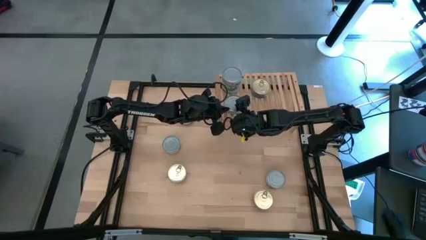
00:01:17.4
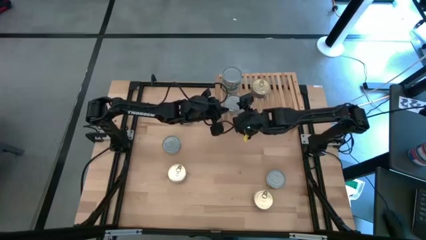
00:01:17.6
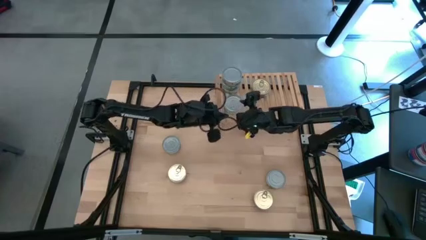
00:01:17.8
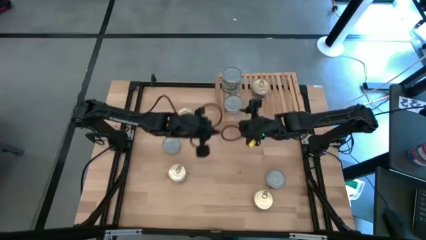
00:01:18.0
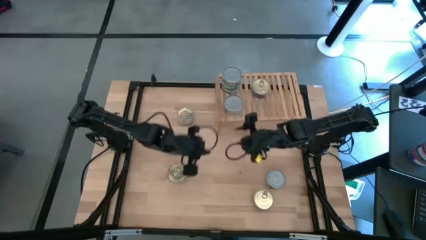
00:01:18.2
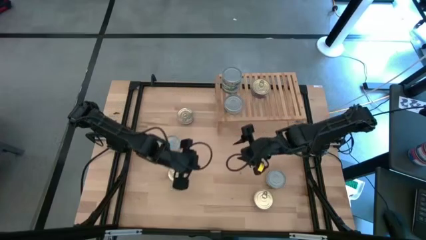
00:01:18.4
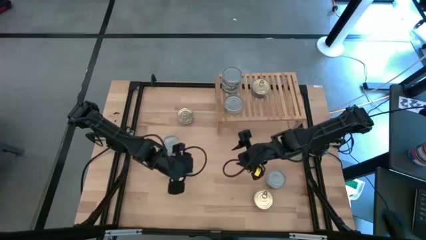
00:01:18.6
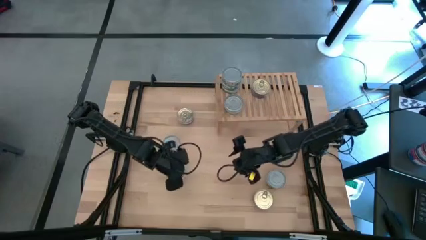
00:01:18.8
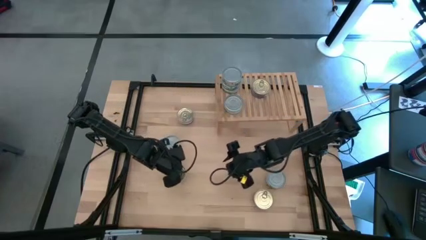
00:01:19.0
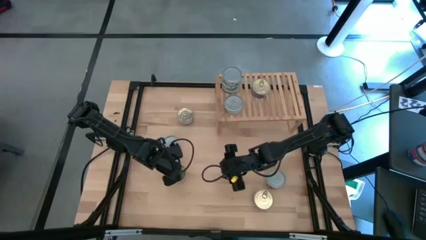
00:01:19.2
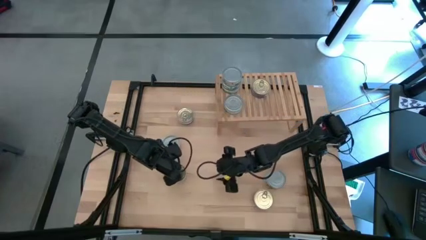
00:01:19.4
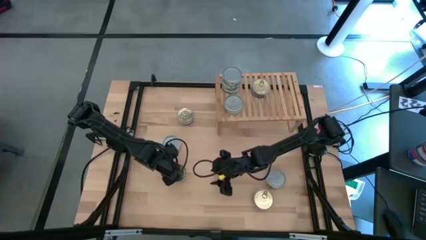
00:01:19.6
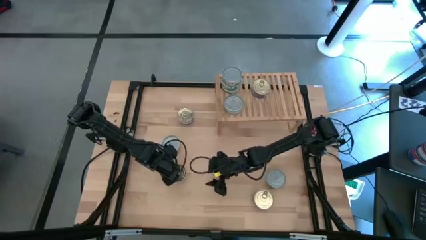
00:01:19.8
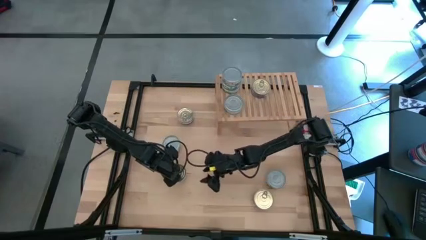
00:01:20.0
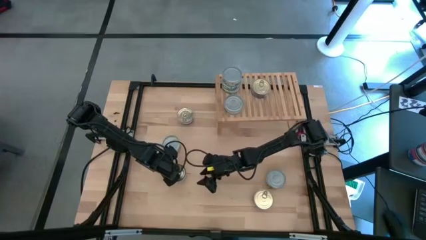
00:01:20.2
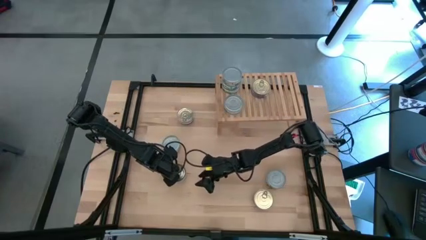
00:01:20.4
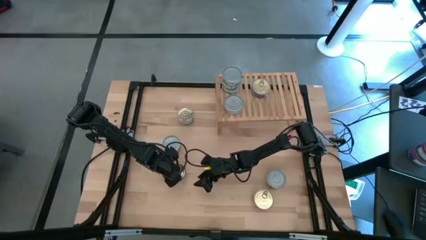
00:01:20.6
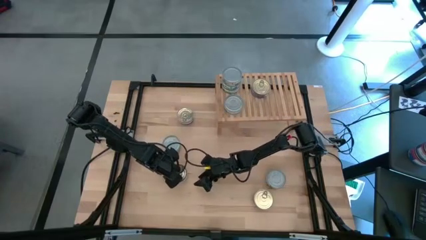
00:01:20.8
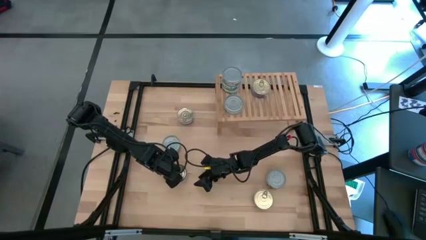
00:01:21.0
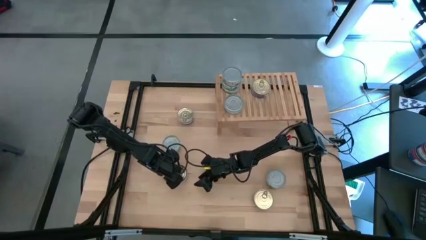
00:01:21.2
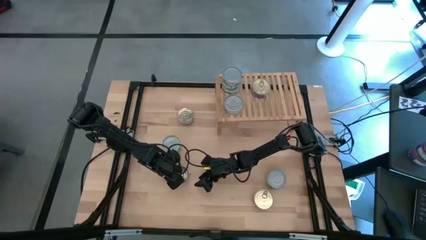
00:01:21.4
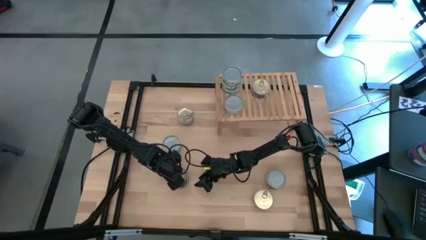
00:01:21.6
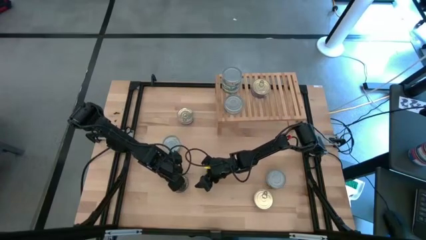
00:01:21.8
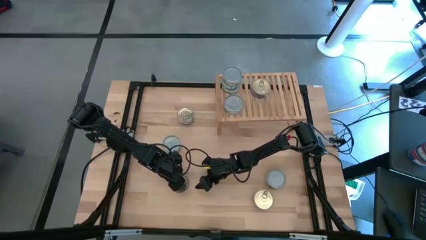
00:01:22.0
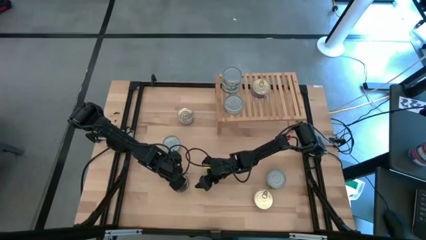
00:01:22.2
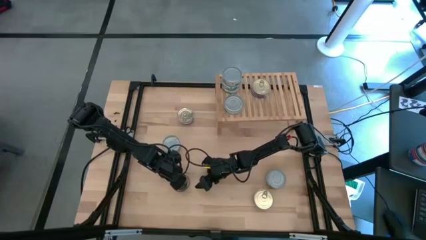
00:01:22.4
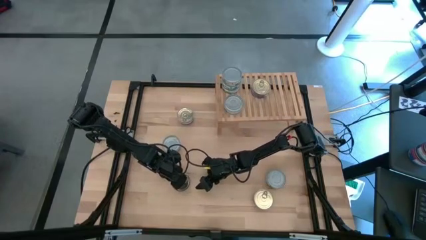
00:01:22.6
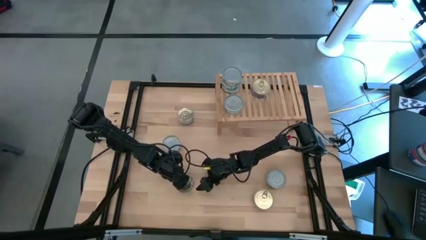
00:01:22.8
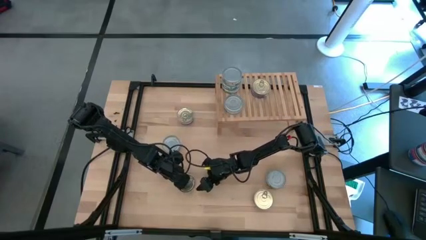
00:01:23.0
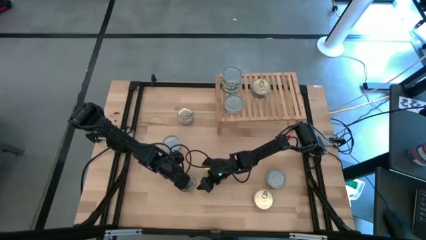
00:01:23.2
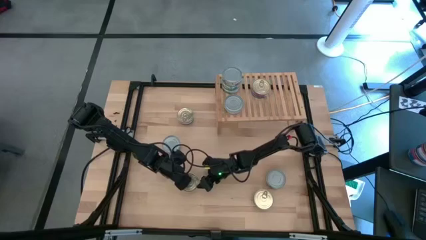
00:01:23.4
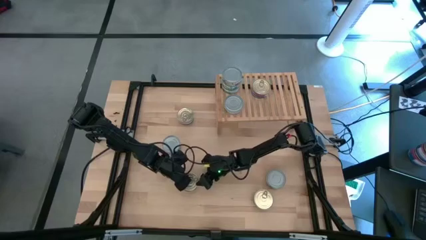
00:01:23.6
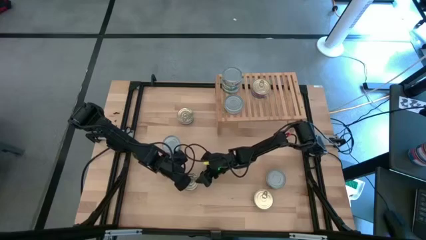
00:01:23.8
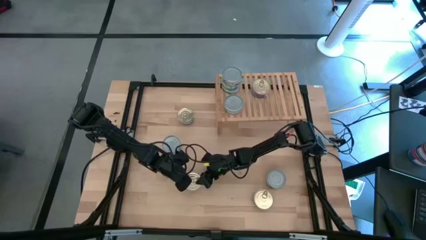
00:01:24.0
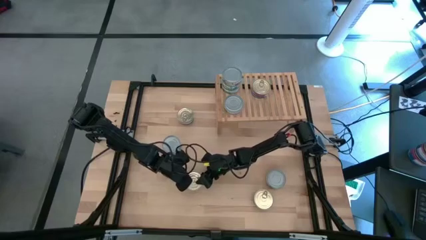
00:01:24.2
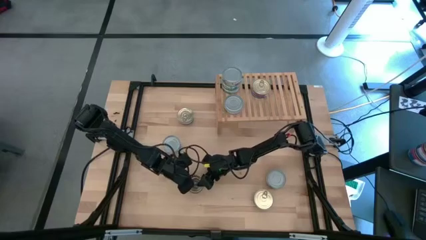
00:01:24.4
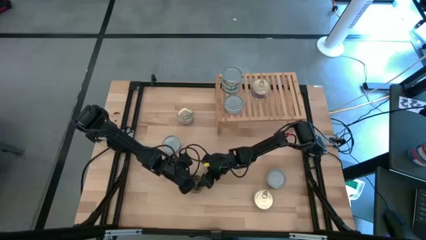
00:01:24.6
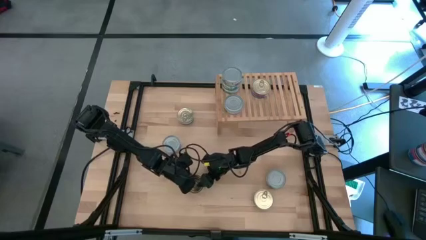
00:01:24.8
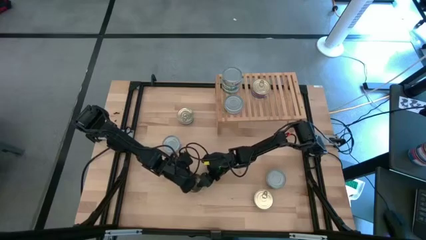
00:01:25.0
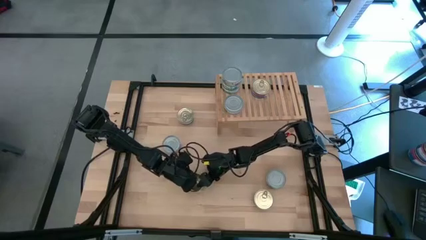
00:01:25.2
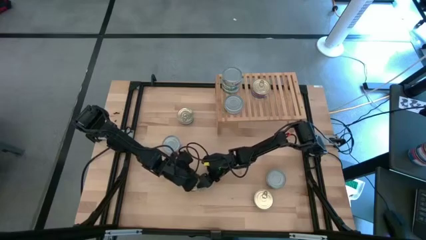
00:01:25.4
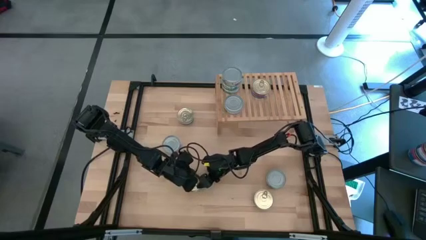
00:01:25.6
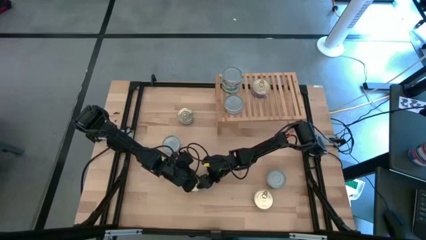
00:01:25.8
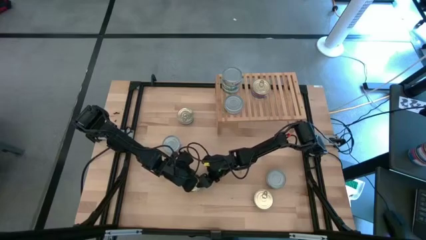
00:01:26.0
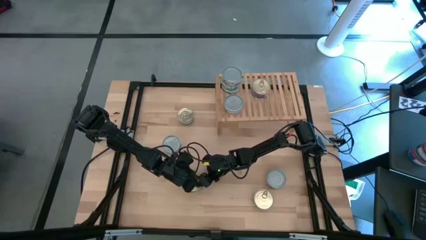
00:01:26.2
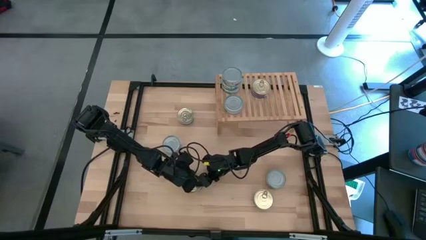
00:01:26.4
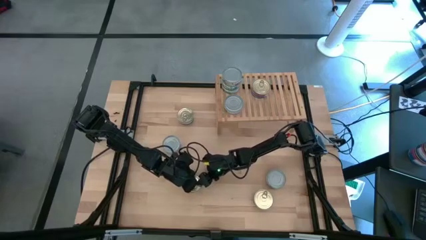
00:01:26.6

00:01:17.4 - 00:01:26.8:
Task: Stack canned seafood by type on shelf
Stack the blue pink tuna can on top of the blue pink tuna can on the shelf

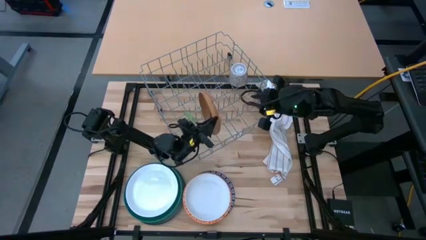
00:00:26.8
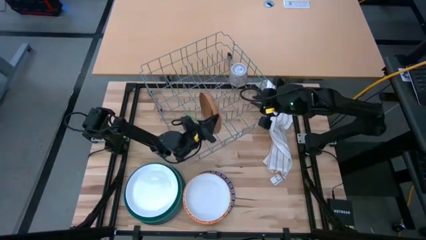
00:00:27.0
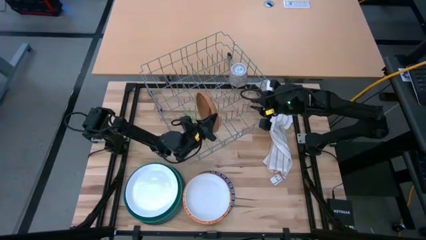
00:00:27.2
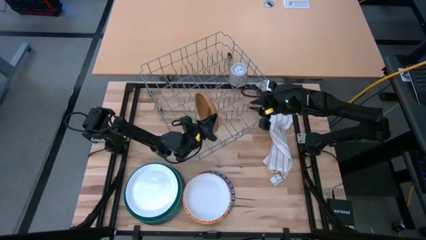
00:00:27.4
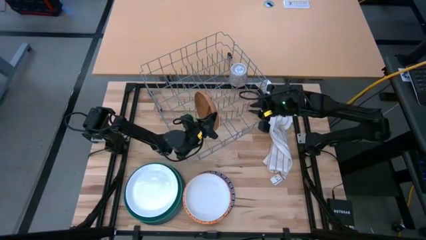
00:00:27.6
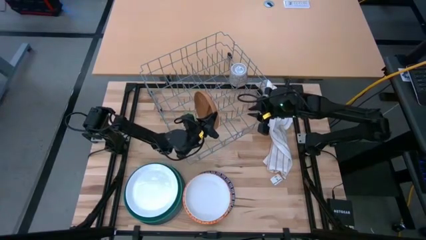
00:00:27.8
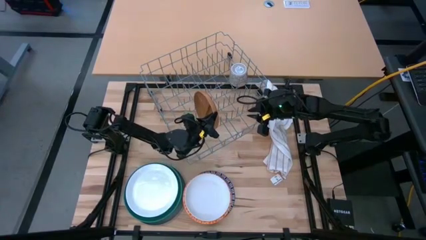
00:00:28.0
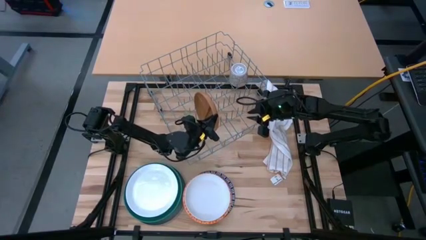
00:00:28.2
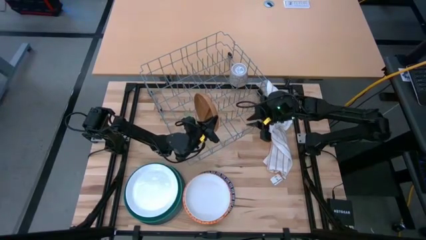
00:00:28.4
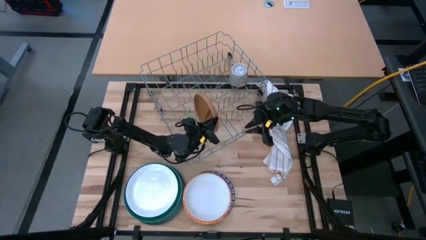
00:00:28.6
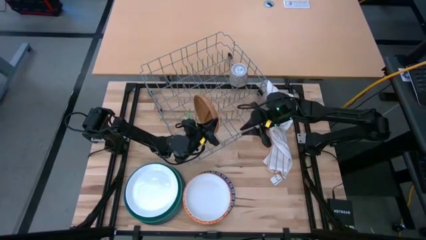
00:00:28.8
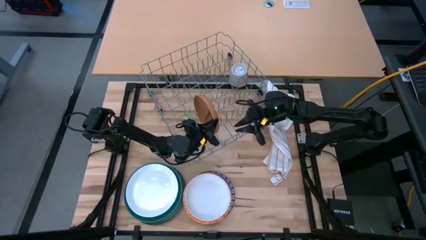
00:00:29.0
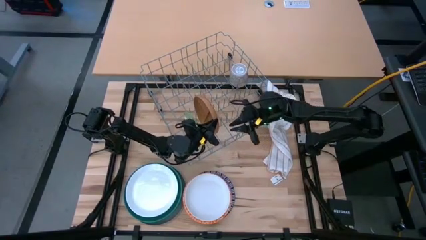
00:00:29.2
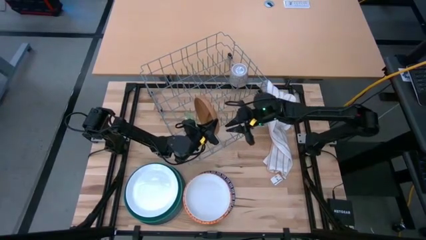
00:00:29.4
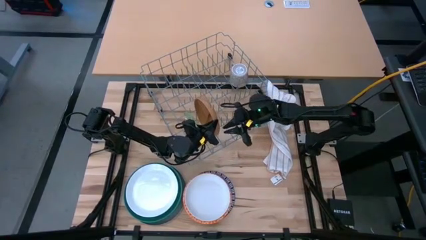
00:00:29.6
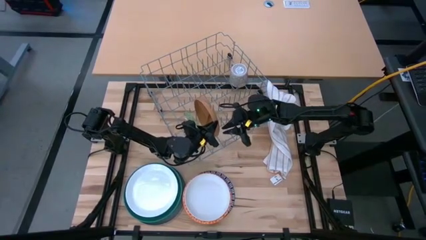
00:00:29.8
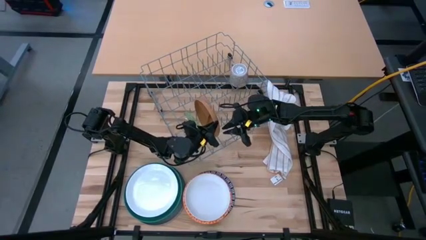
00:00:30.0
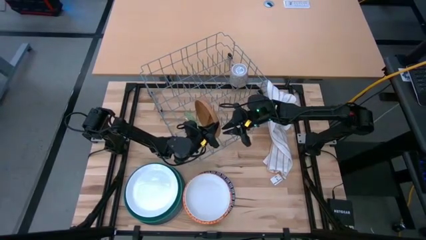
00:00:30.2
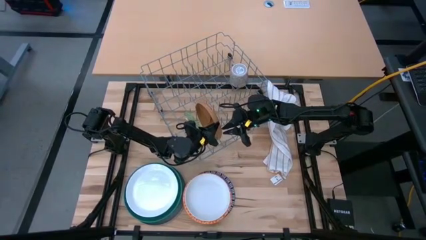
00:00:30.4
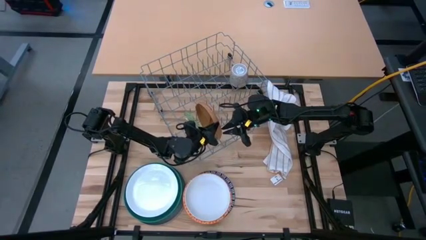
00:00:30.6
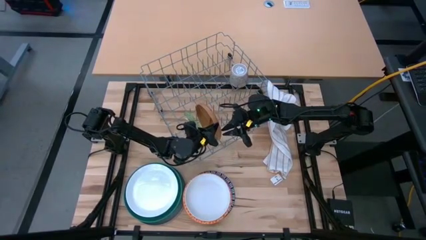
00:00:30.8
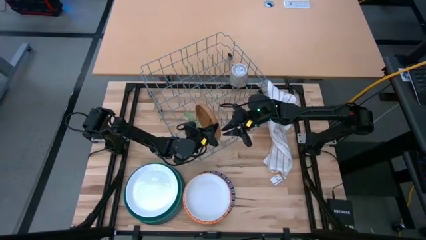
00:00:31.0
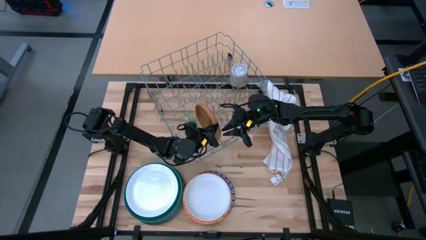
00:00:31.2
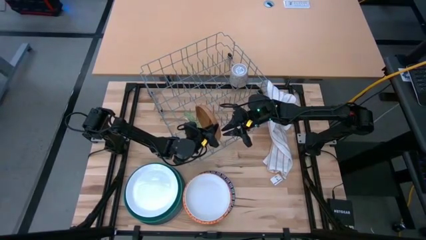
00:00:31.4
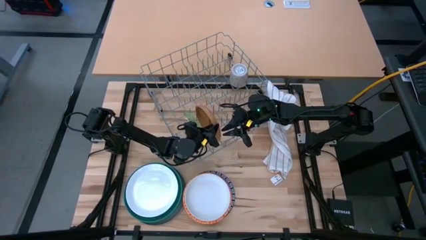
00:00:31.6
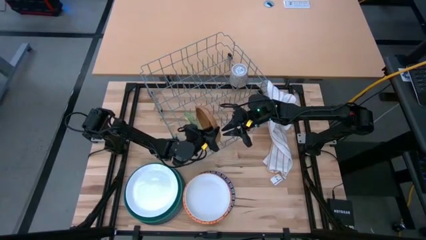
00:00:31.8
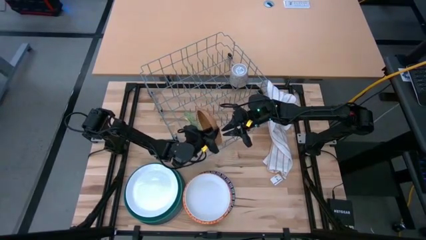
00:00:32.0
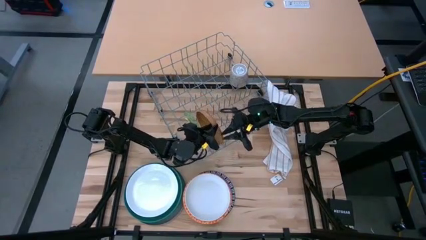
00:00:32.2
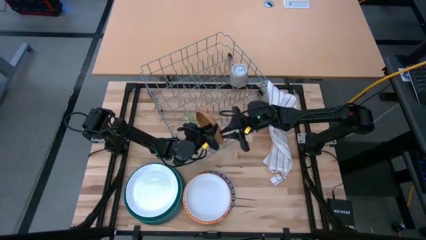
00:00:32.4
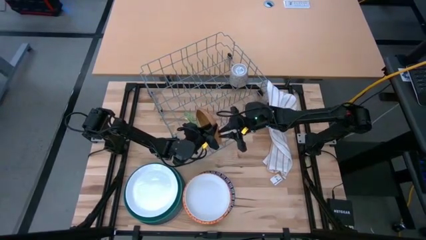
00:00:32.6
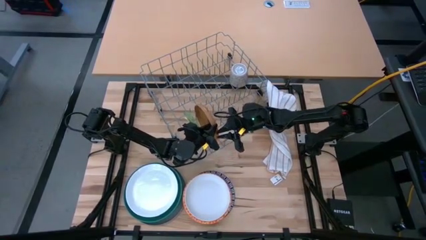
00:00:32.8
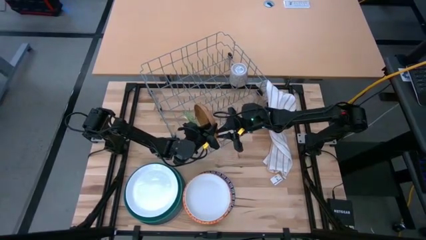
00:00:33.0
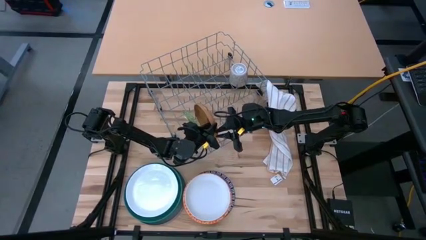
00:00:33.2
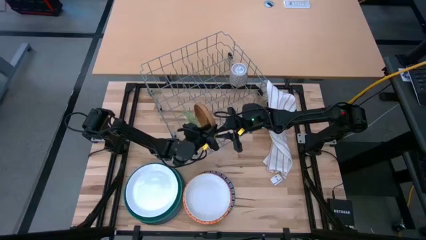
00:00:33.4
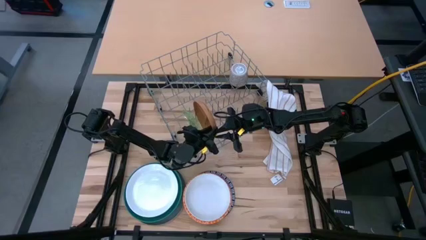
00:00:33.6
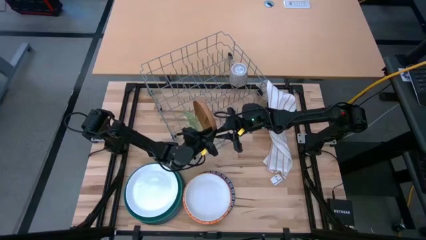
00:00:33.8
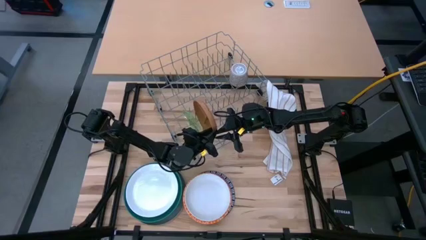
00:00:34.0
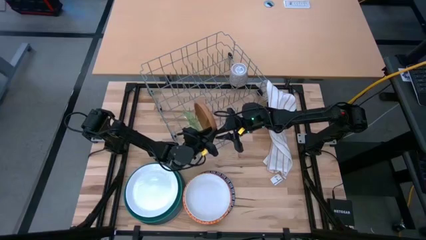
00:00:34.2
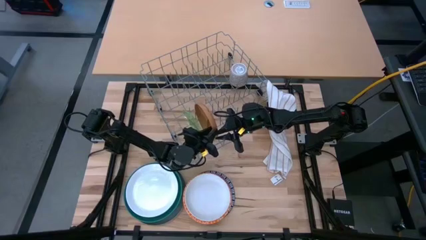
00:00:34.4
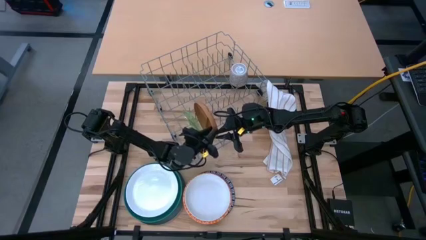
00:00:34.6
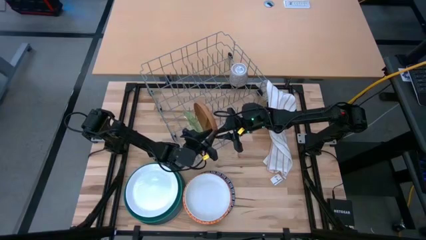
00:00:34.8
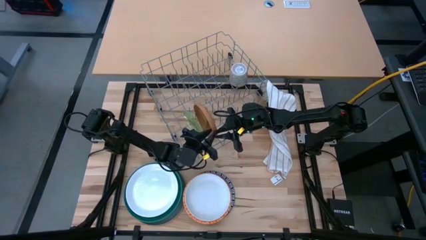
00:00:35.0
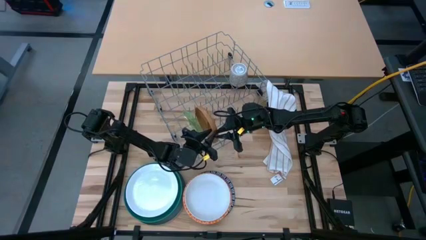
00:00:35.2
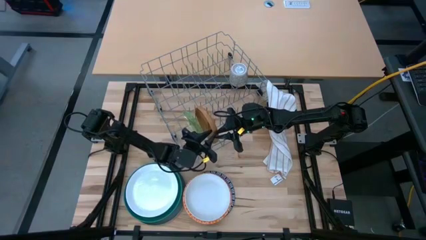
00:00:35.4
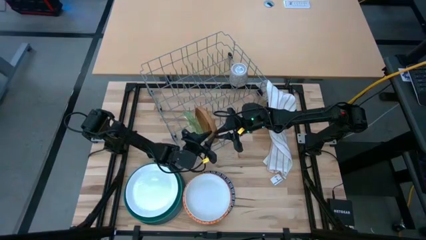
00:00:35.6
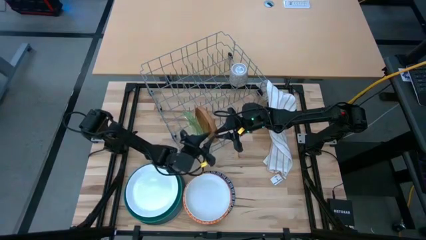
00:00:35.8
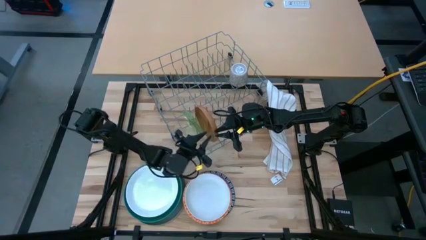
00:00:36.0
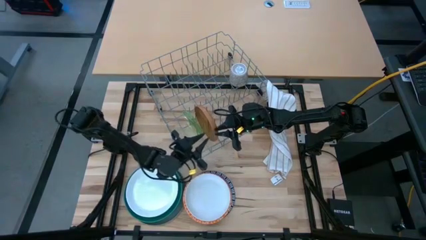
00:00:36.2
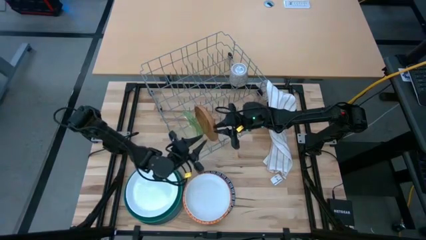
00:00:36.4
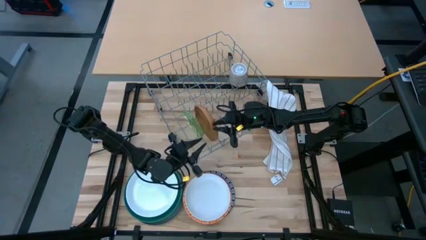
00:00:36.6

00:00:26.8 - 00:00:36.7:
Task: Sort dishes
Put the brown plate into the dish rack
